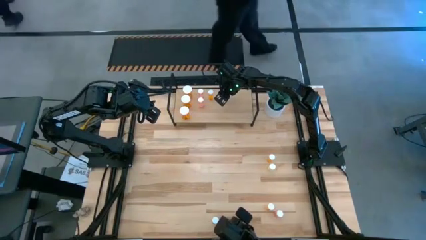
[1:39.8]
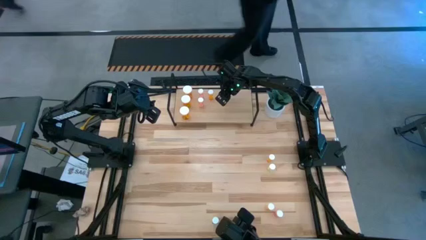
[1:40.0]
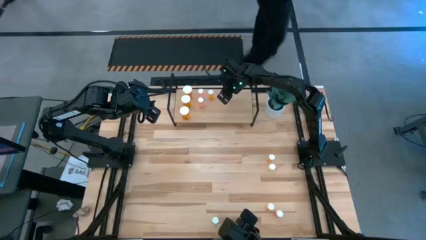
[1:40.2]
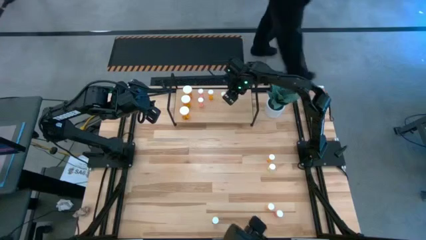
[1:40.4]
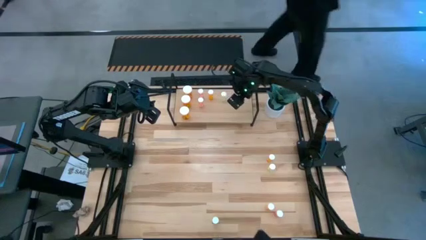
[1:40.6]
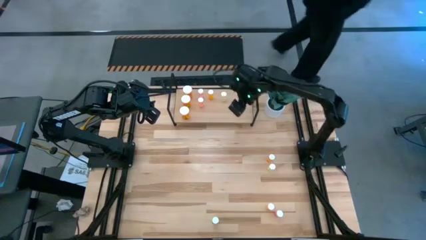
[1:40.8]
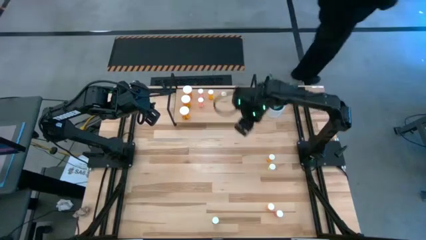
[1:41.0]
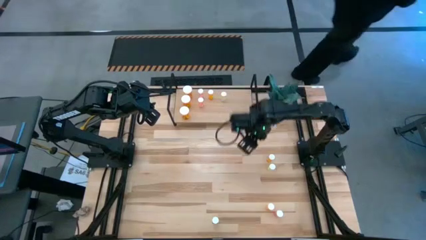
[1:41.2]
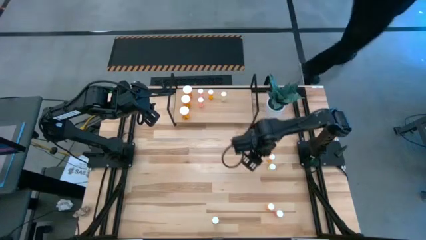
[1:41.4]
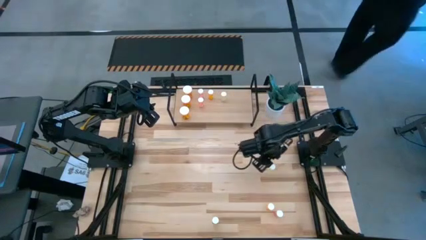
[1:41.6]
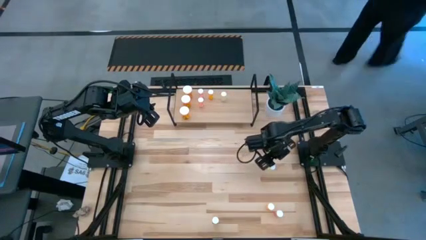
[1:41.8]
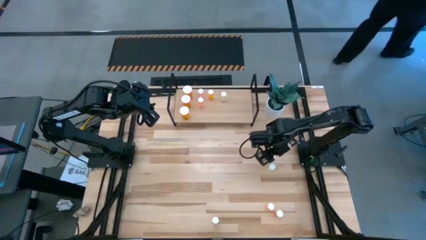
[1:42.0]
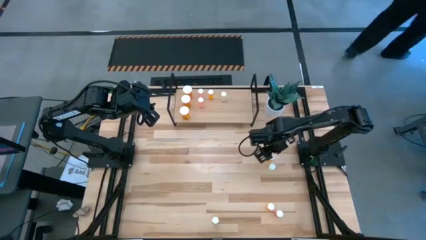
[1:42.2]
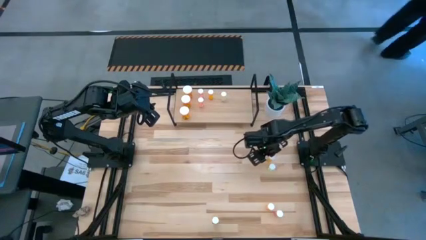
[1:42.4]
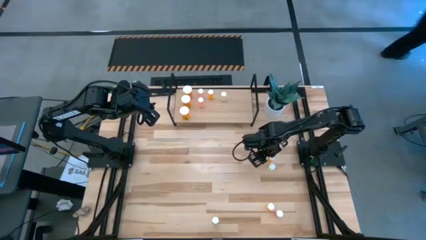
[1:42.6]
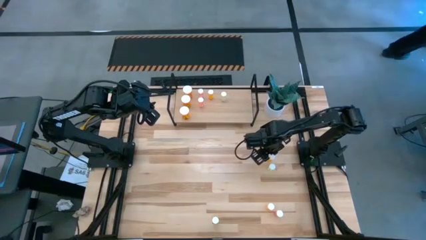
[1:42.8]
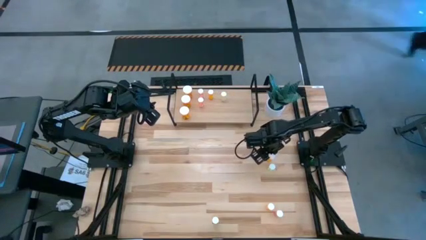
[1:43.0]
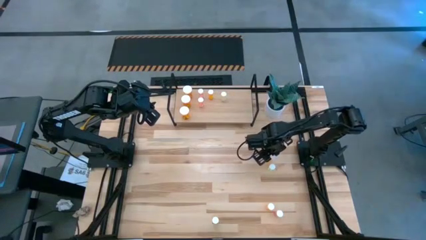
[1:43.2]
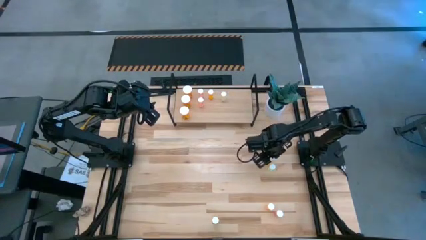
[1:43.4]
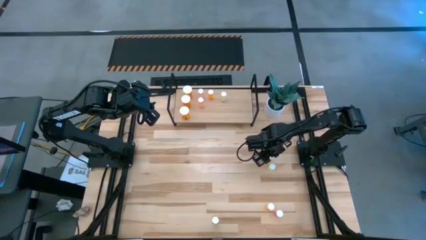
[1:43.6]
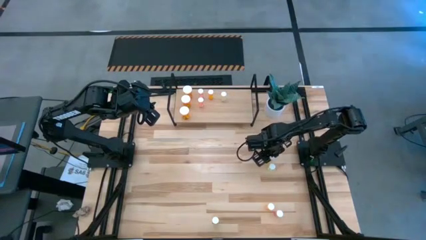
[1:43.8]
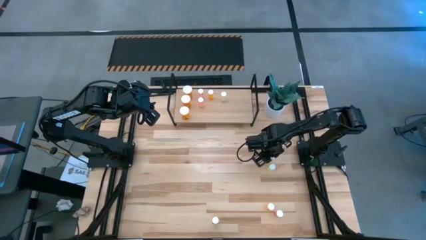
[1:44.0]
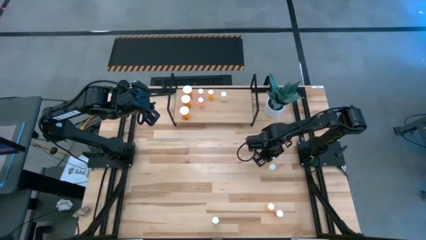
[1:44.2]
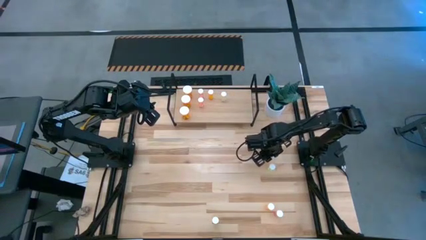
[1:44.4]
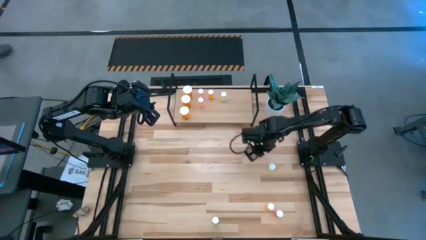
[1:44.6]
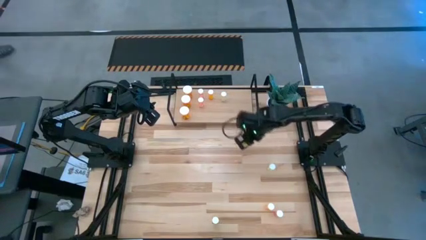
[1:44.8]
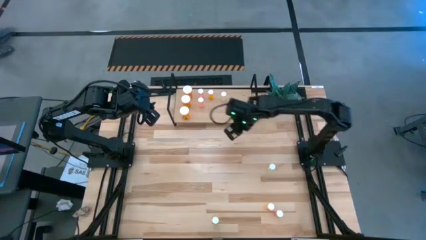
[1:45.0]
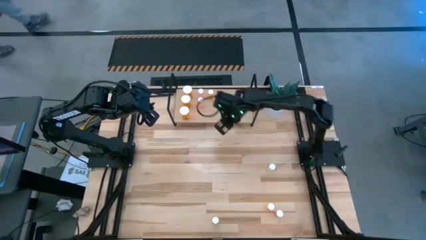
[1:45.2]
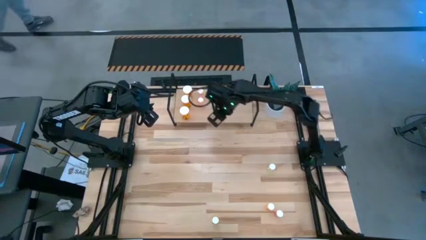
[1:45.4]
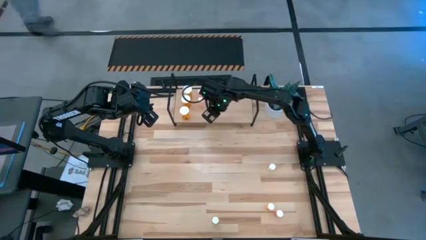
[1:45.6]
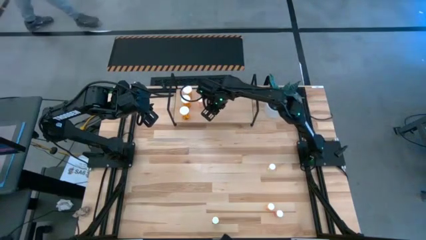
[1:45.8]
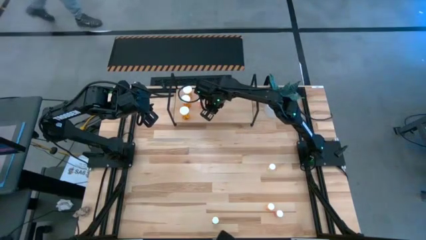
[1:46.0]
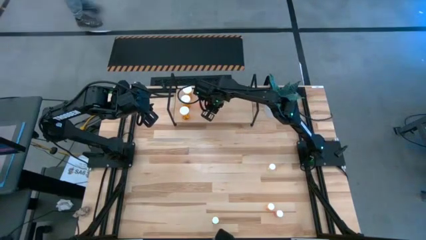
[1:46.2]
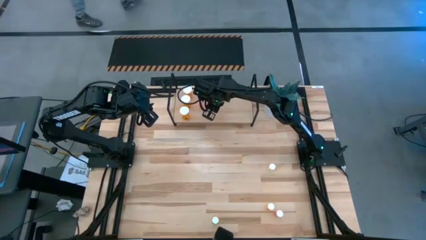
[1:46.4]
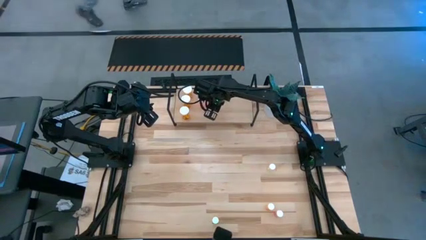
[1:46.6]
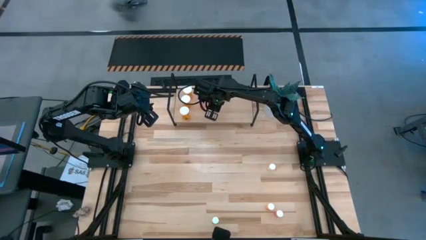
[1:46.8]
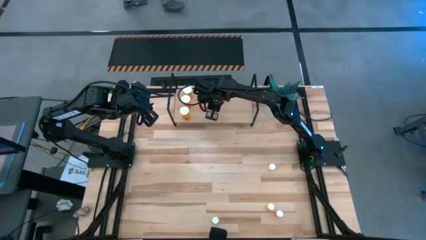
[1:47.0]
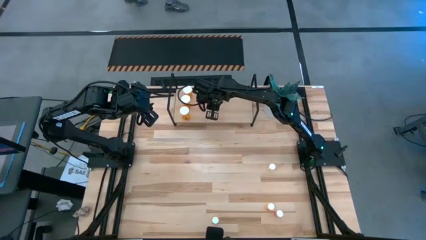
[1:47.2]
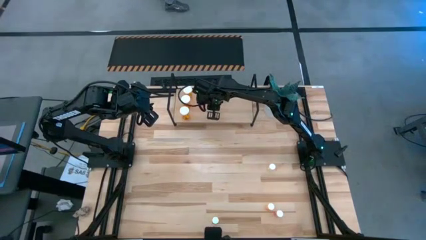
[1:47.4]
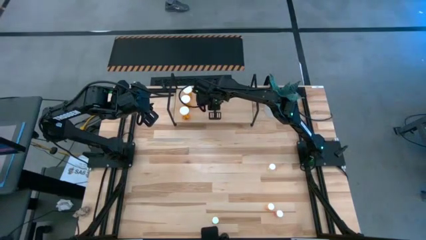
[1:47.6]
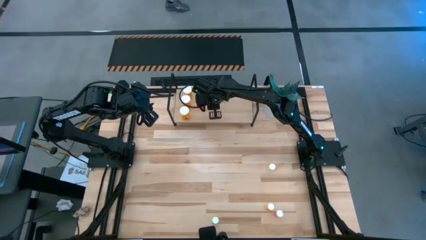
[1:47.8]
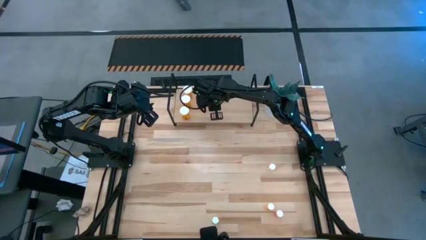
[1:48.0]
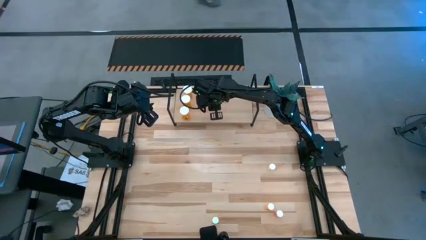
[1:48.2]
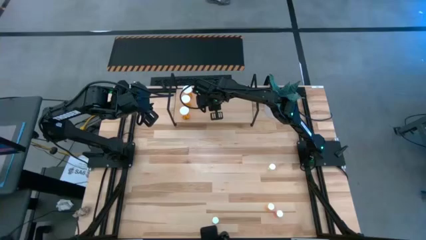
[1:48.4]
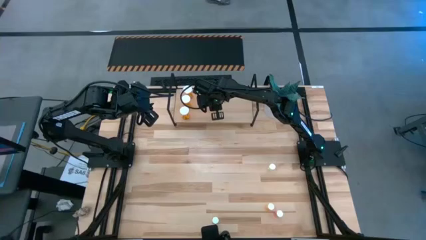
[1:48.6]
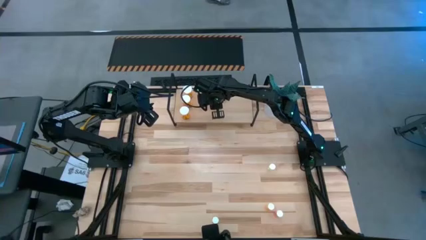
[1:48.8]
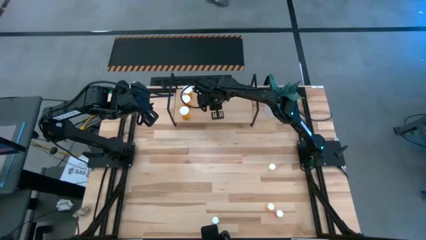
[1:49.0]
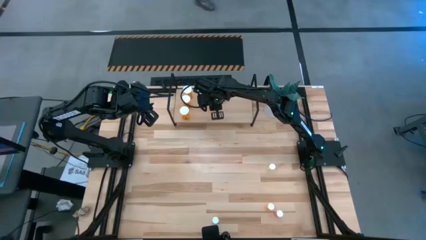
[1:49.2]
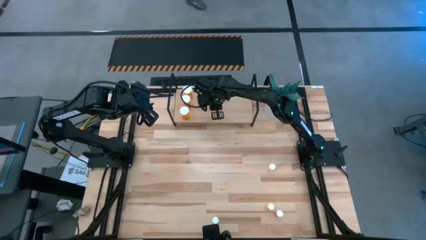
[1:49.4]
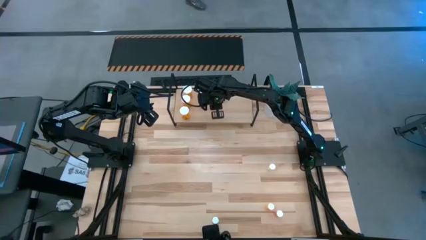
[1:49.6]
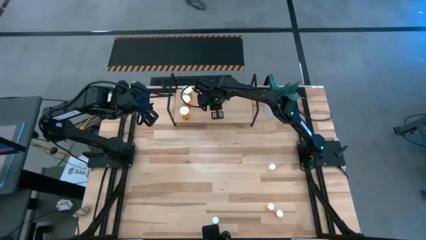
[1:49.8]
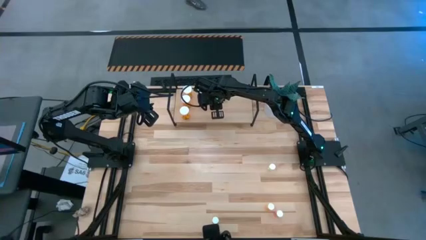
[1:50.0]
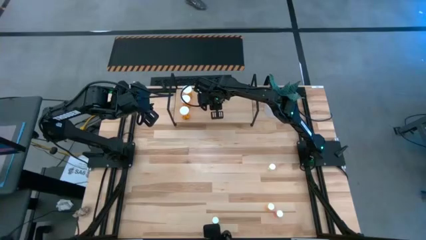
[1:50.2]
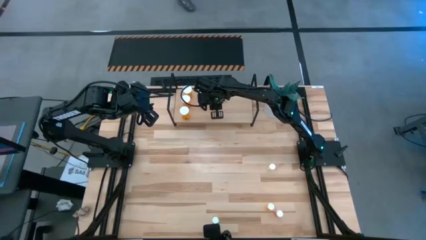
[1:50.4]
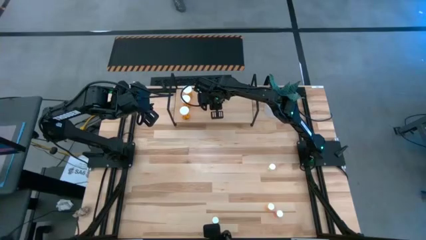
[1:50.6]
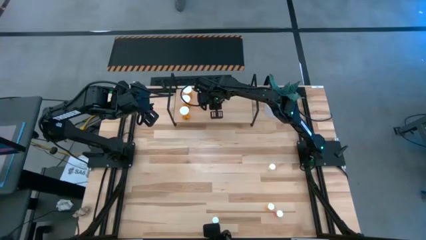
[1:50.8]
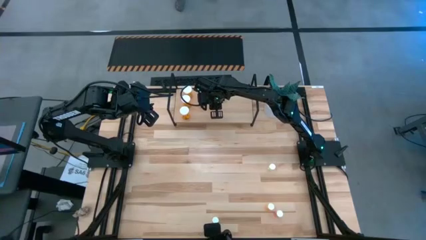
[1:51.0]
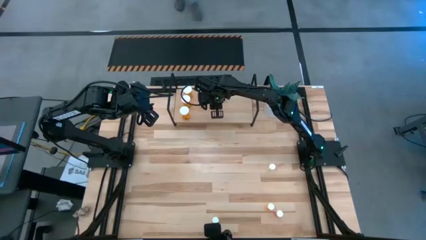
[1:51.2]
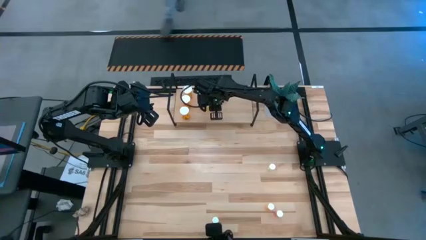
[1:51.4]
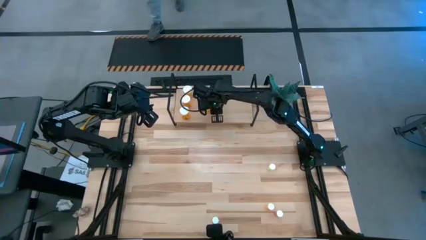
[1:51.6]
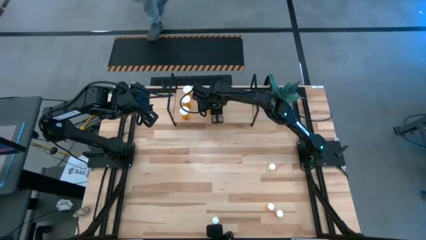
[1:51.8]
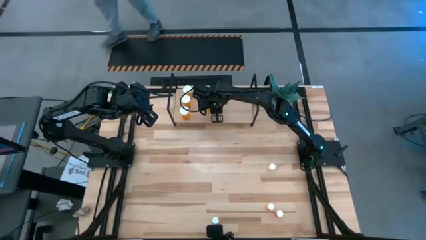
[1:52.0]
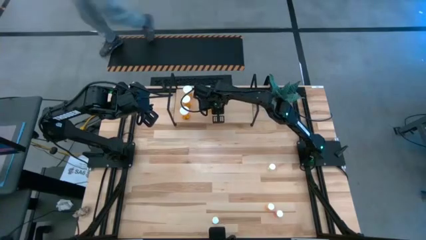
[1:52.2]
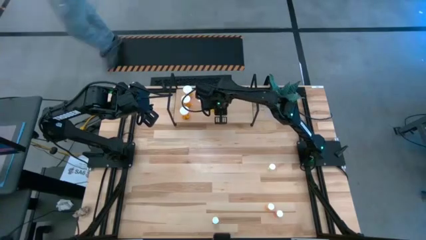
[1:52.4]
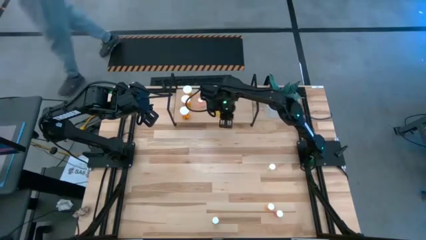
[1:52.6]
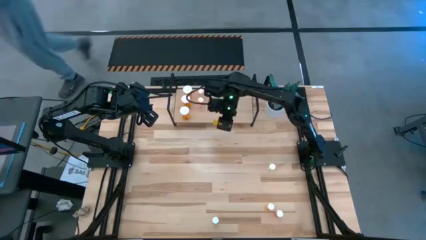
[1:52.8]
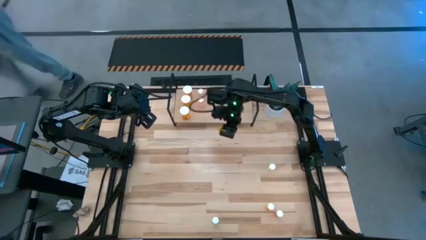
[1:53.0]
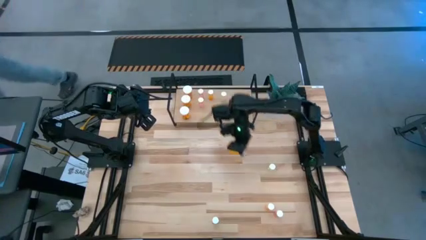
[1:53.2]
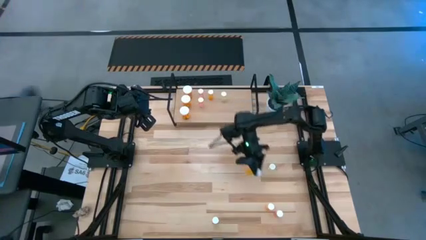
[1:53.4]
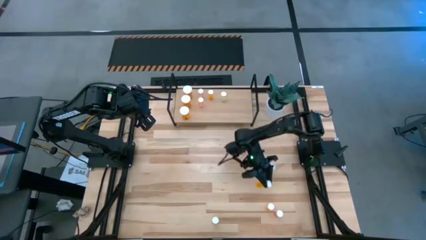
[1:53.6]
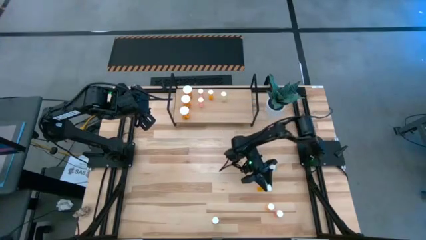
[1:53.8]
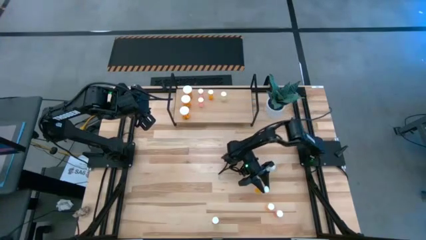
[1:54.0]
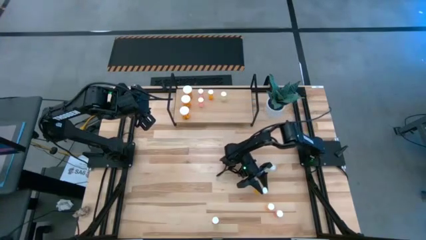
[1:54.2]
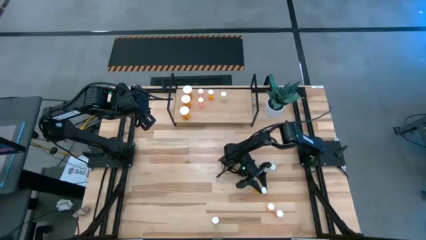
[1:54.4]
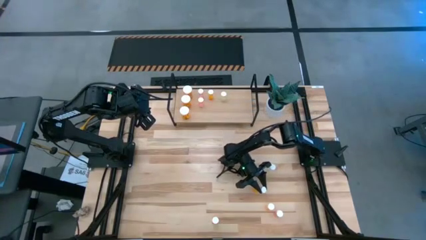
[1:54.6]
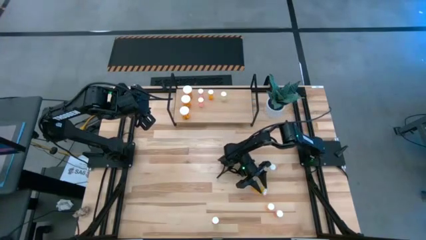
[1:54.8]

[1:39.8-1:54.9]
Task: Pick and place medicine bottles onto shelf by color
Put the top small orange pill bottle on the shelf aligned with the other small orange pill bottle
